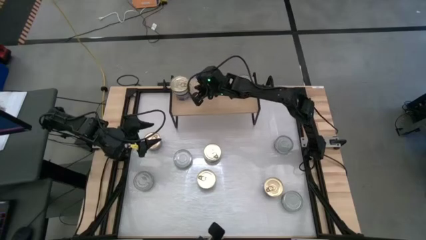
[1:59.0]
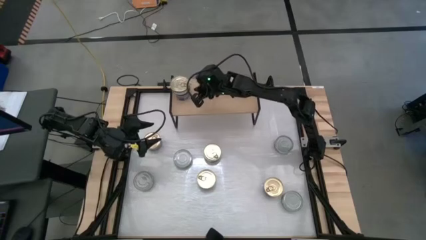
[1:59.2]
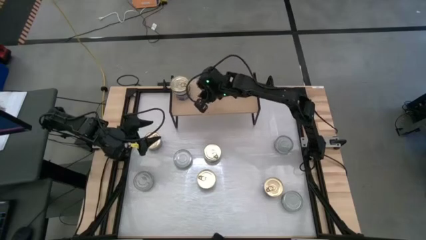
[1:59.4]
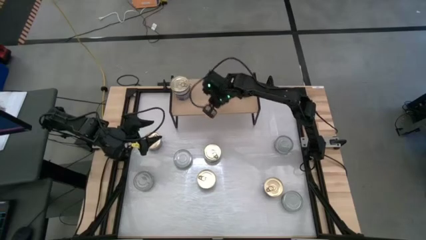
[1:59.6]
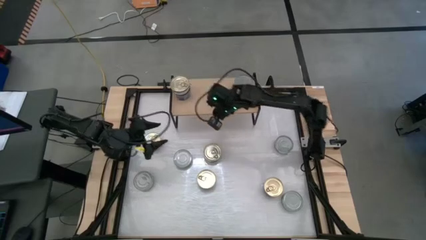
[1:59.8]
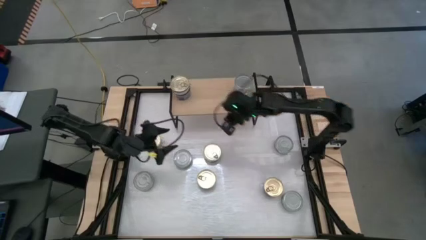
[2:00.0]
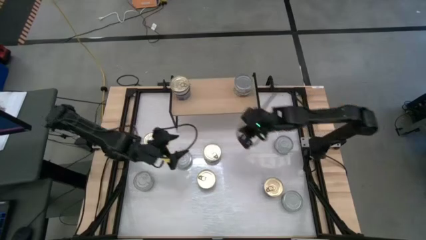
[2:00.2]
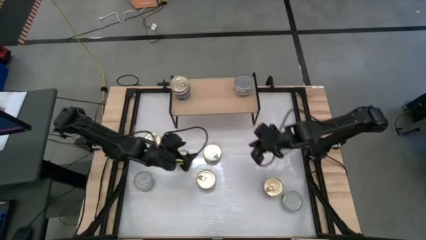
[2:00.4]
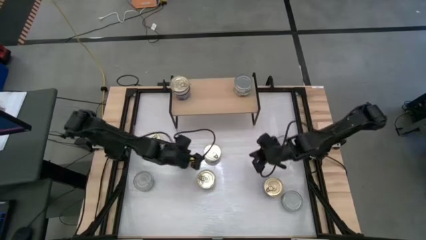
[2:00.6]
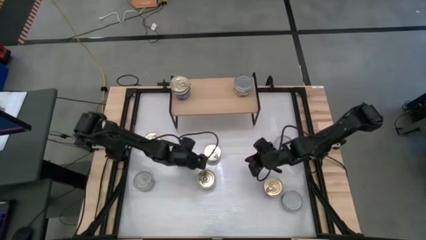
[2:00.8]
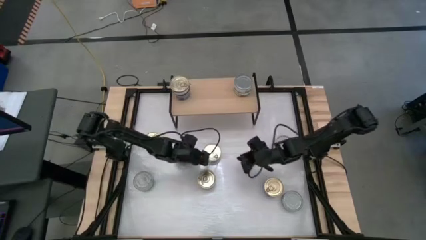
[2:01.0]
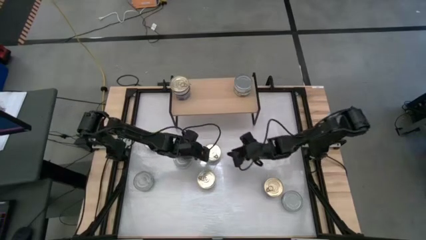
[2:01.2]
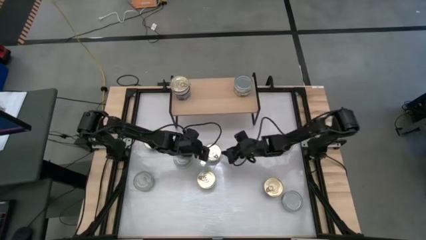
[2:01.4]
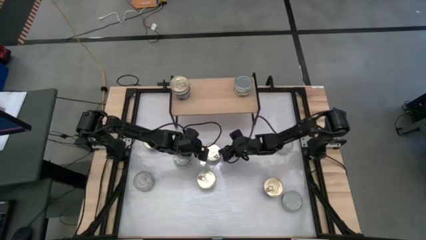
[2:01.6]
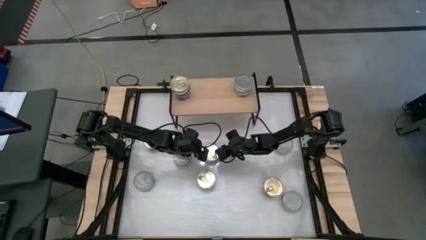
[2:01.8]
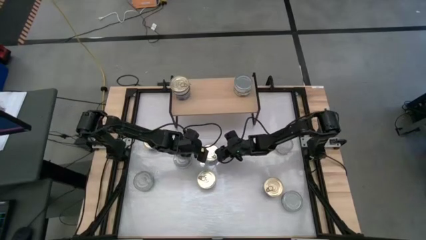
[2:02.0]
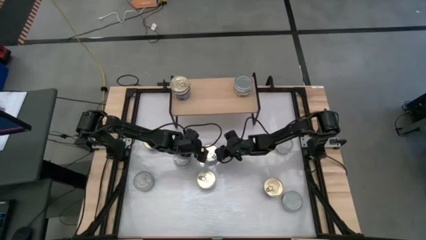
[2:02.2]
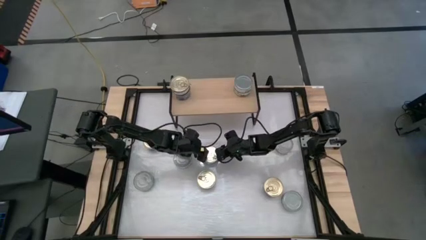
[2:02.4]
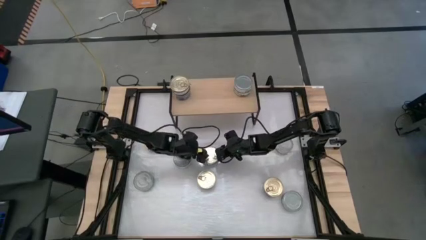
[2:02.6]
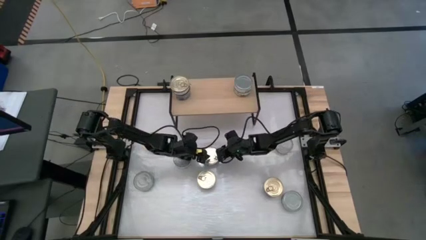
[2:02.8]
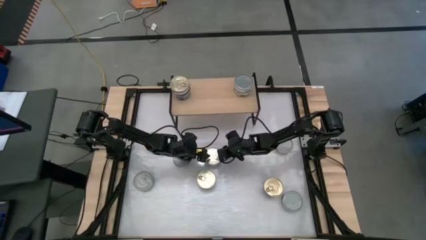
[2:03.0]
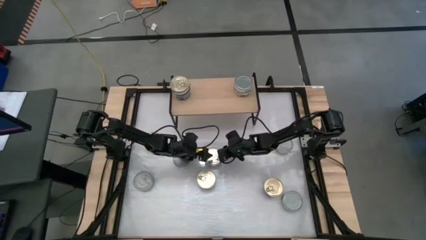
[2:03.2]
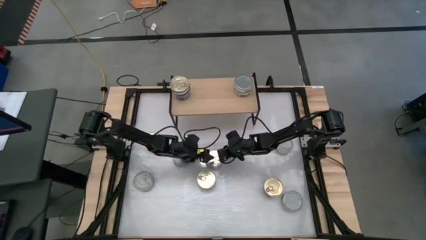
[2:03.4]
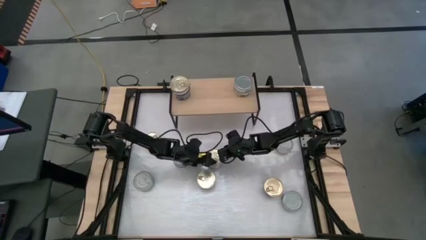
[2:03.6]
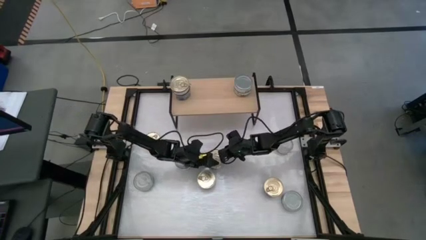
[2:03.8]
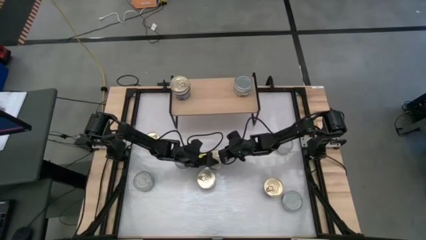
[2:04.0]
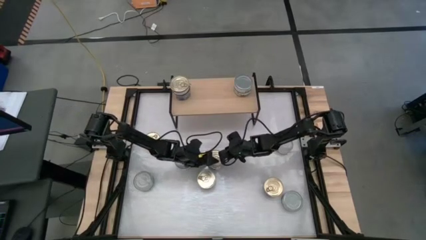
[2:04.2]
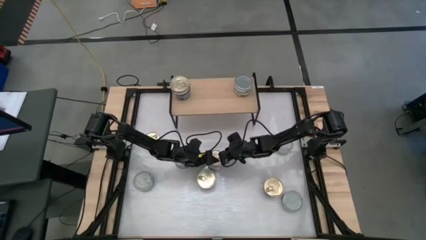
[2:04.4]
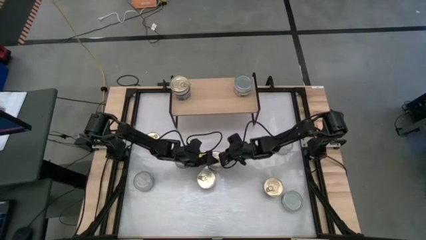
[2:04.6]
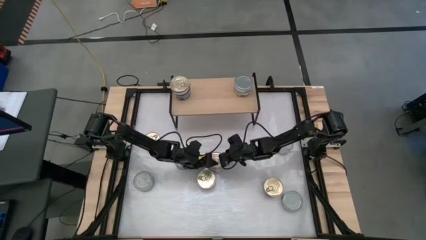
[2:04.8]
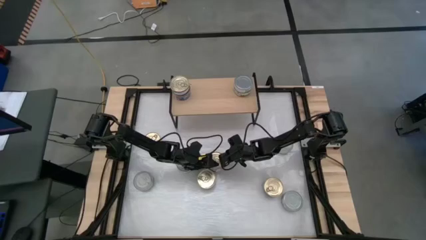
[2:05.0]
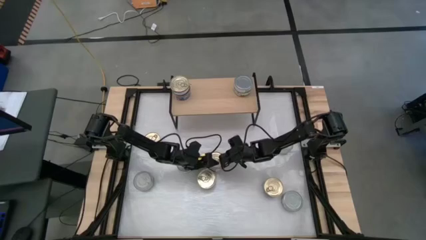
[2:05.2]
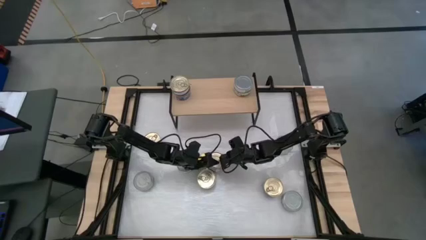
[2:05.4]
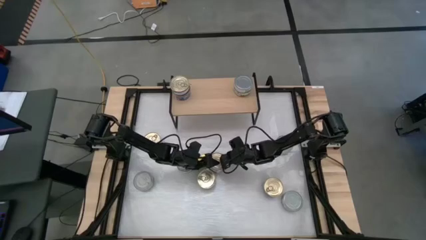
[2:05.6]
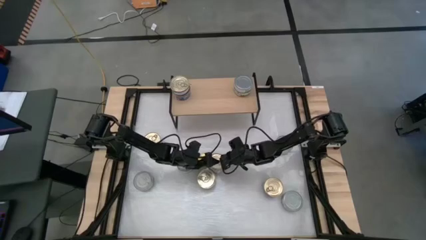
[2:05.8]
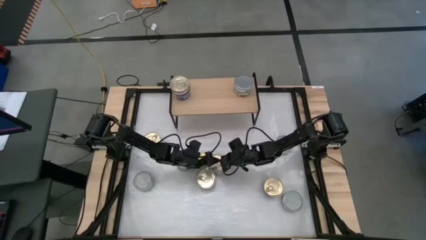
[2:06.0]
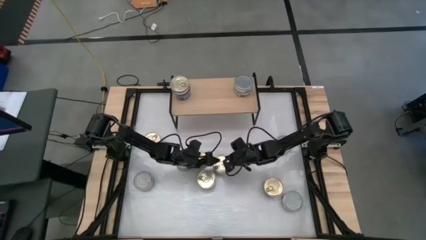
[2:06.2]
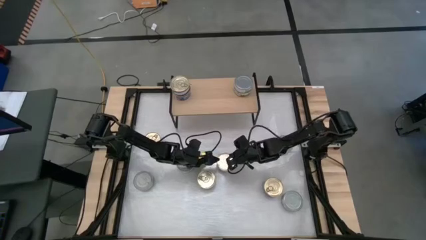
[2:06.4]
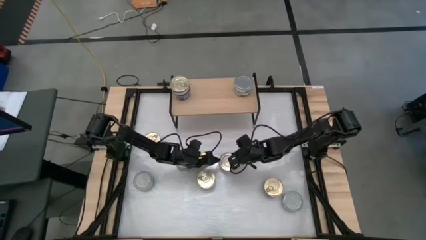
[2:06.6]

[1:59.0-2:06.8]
Task: Stack canned seafood by type on shelf
Put the blue pink tuna can on the shelf aligned with the stacked blue pink tuna cans

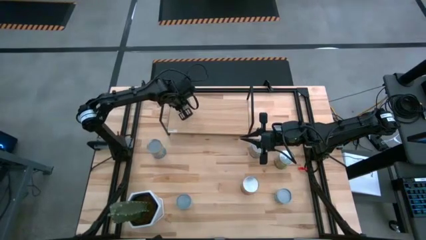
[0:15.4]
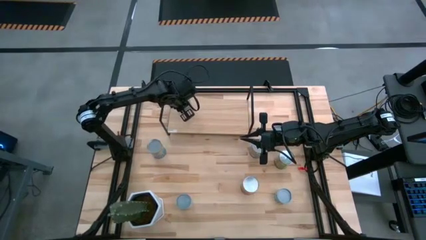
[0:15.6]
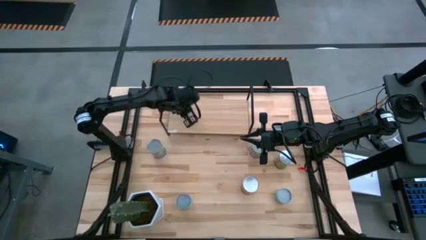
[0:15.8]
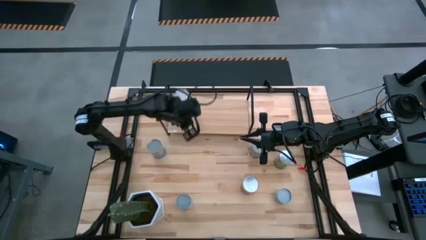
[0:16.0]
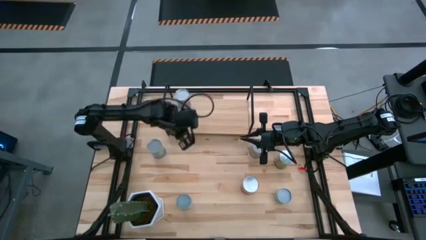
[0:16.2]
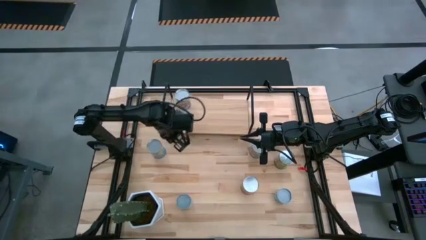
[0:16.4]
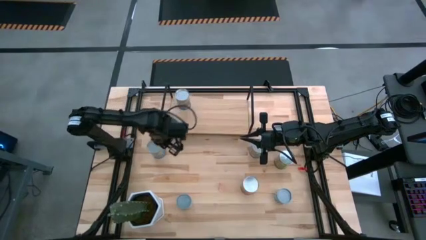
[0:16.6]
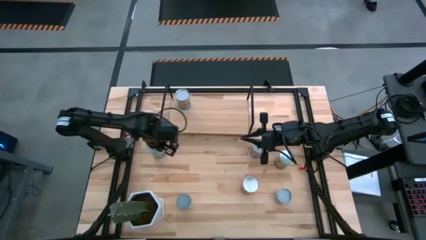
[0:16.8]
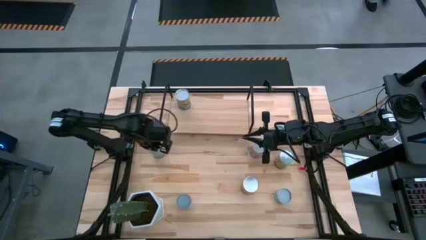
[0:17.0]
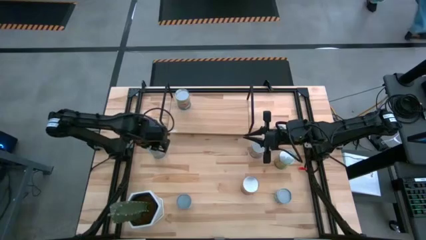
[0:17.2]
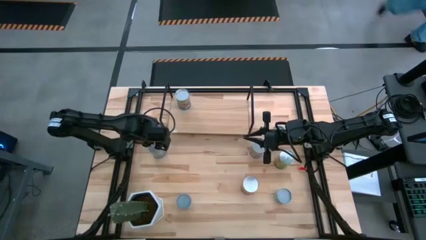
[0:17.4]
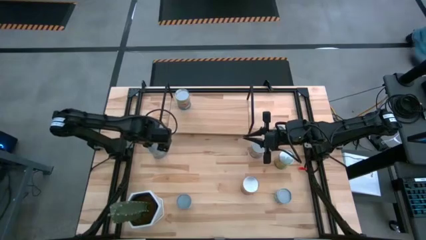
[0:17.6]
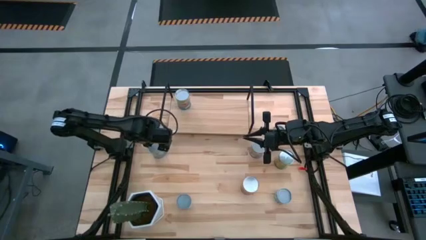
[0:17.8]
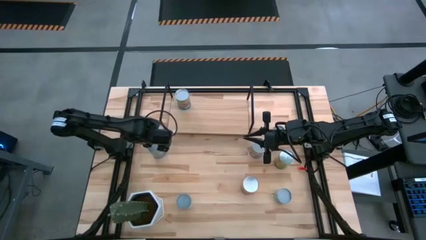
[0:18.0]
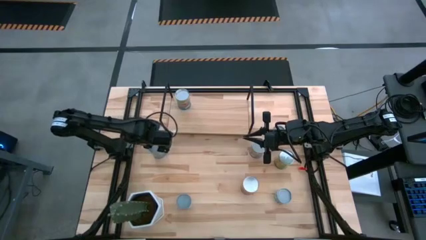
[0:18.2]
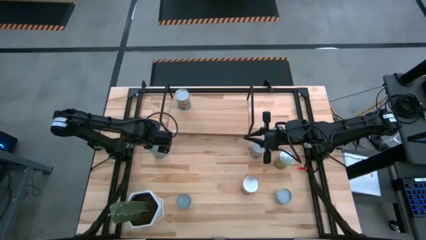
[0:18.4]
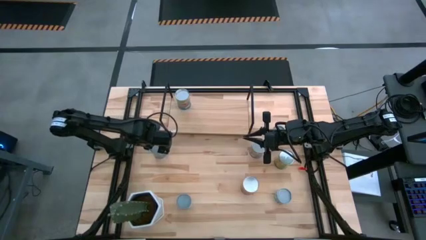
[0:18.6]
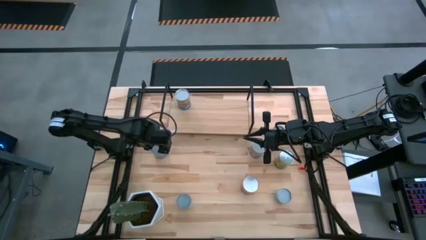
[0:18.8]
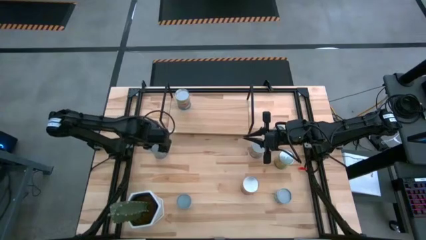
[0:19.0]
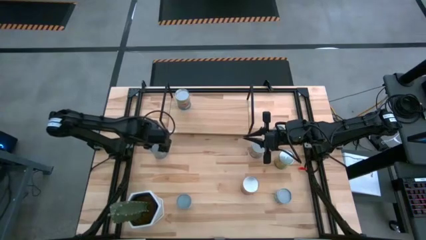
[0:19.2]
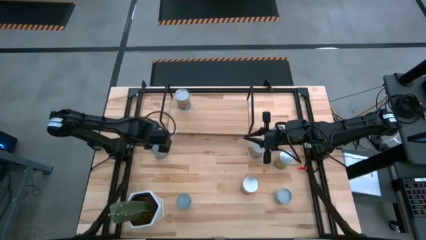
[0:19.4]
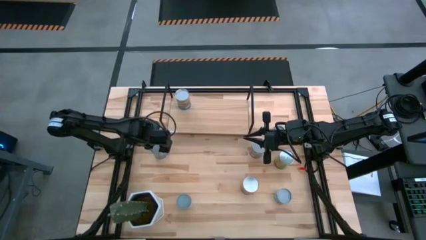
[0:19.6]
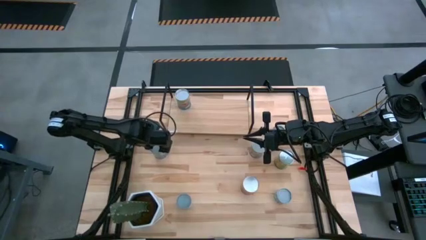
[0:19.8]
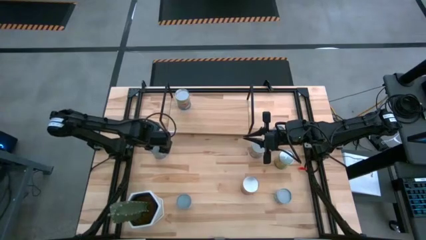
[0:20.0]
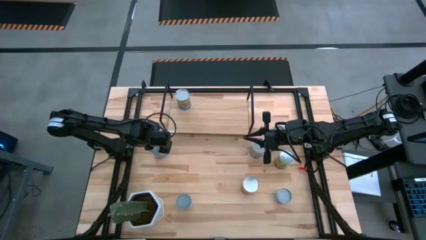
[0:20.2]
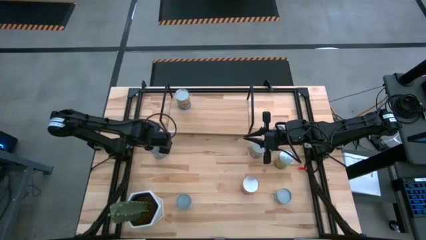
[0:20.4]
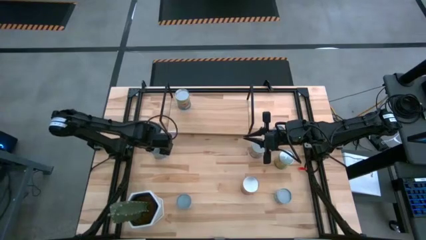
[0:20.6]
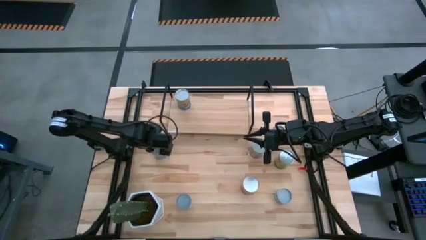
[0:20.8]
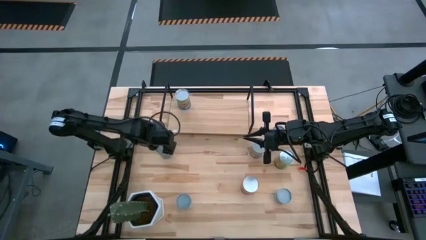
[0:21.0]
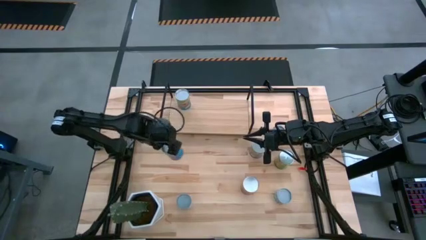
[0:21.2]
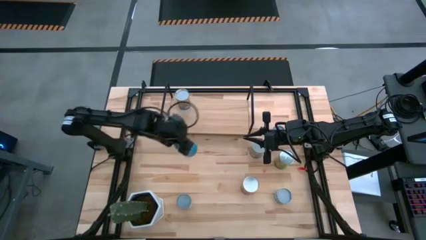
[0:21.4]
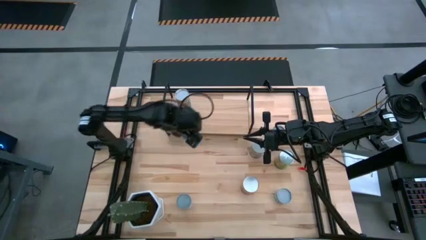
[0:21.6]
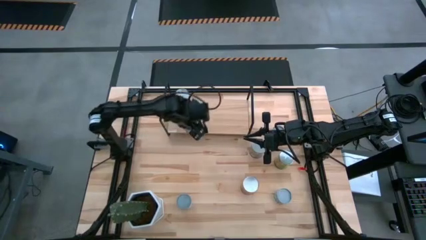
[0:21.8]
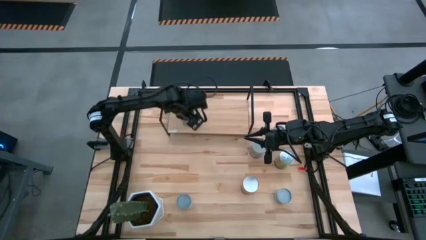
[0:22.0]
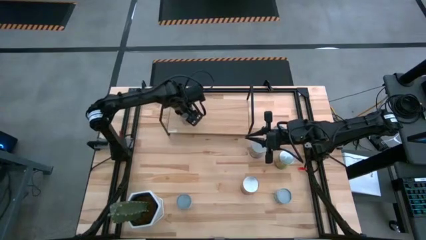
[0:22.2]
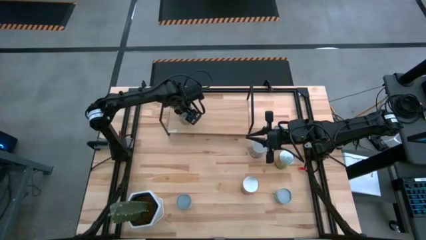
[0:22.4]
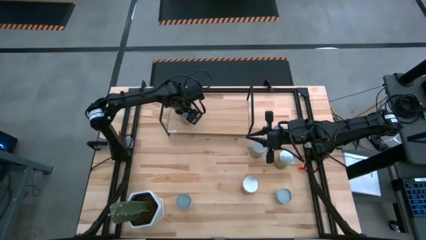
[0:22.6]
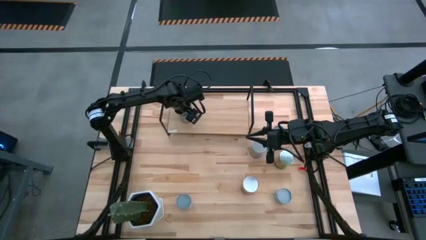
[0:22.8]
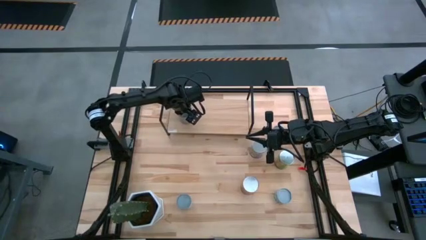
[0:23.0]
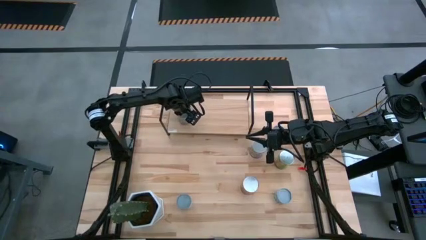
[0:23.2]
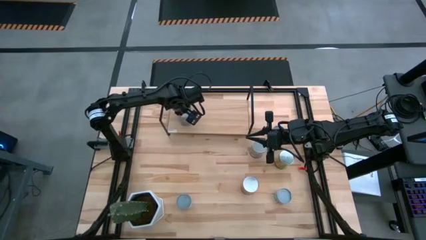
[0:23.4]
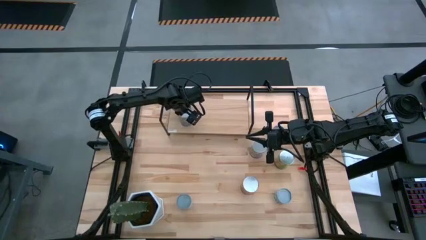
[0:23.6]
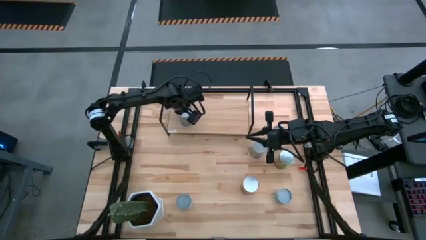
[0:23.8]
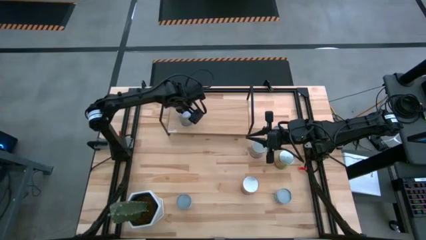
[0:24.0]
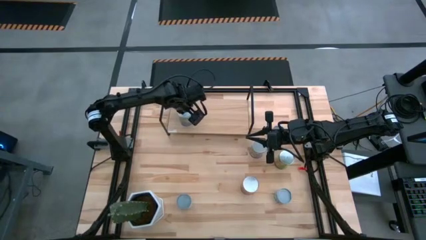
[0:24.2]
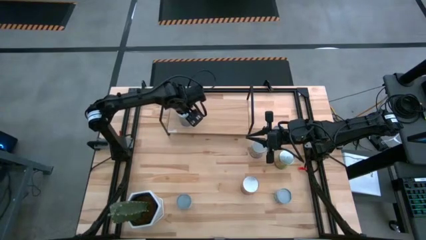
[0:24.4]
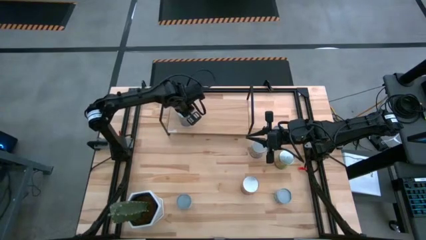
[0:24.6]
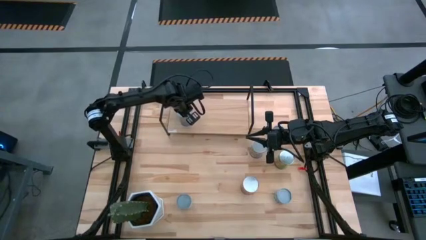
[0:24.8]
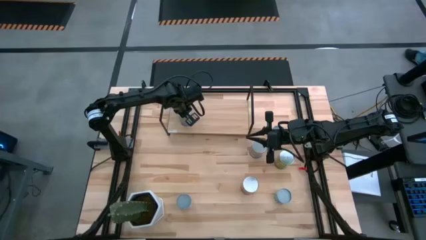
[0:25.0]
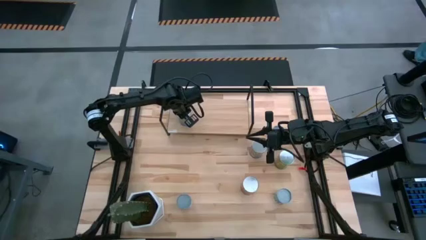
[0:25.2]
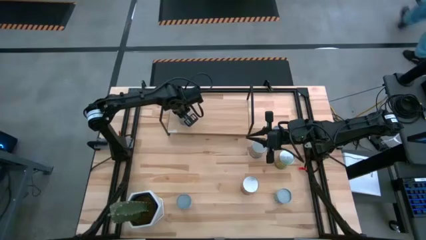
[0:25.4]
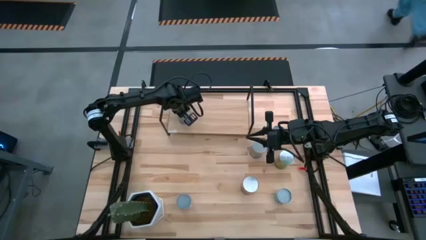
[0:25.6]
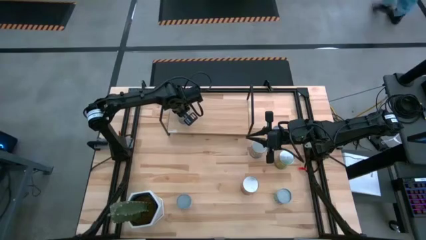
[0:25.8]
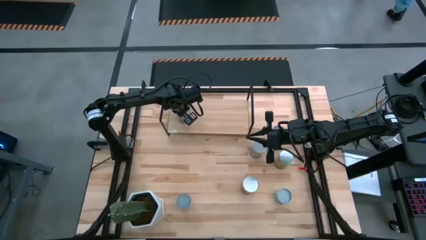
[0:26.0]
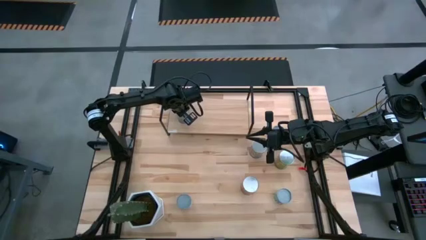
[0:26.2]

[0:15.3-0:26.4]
Task: Pick and place cans onto a shelf
Put the canned cherries on the shelf
